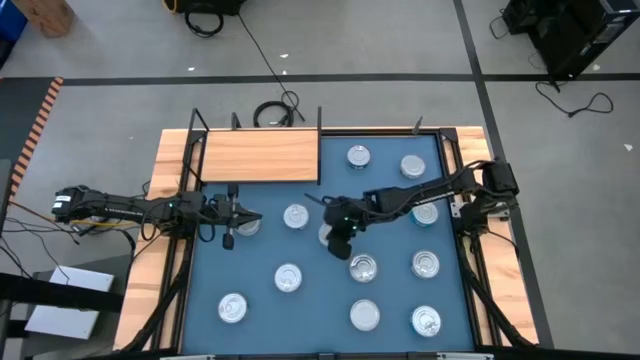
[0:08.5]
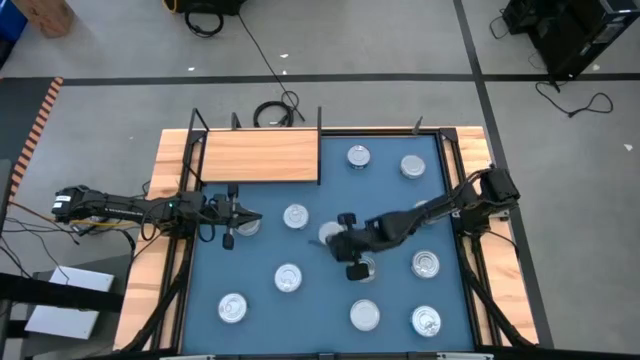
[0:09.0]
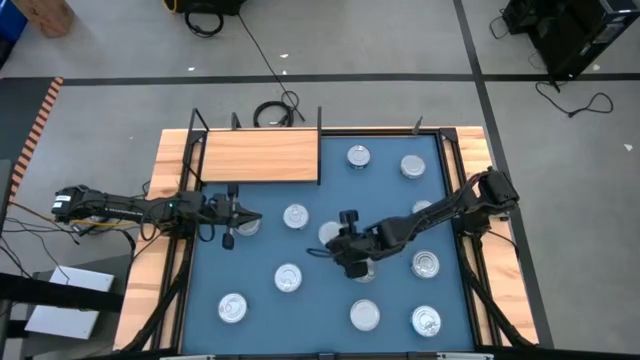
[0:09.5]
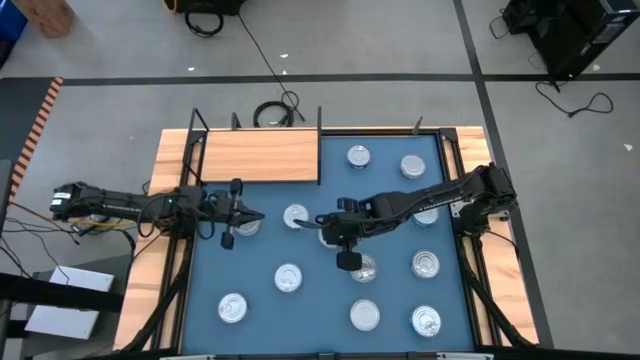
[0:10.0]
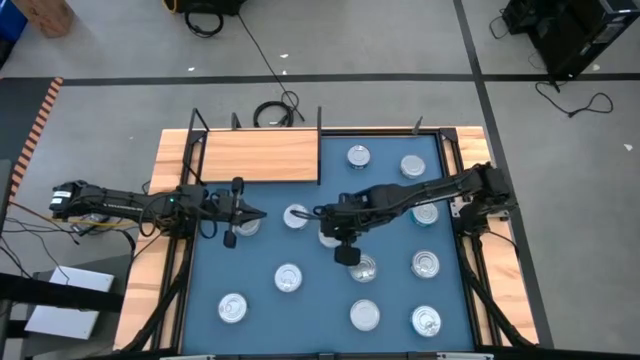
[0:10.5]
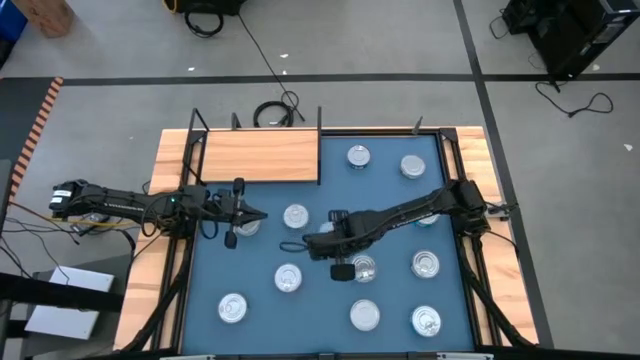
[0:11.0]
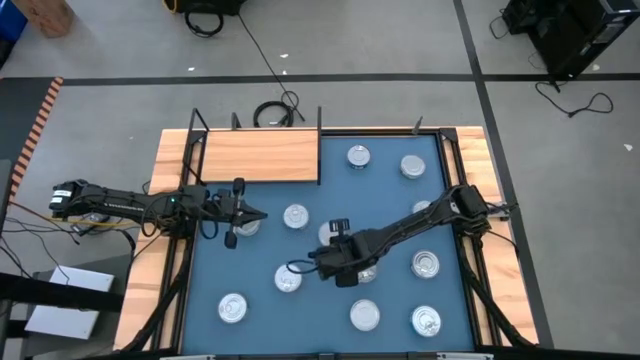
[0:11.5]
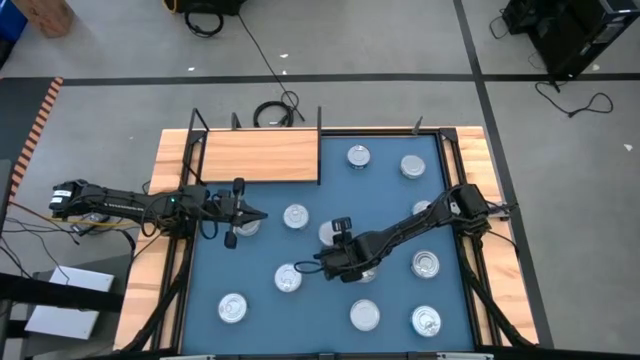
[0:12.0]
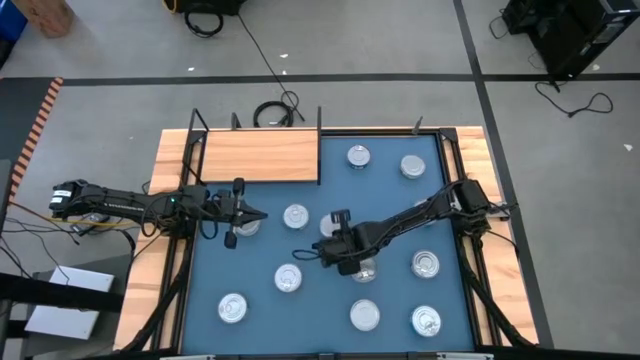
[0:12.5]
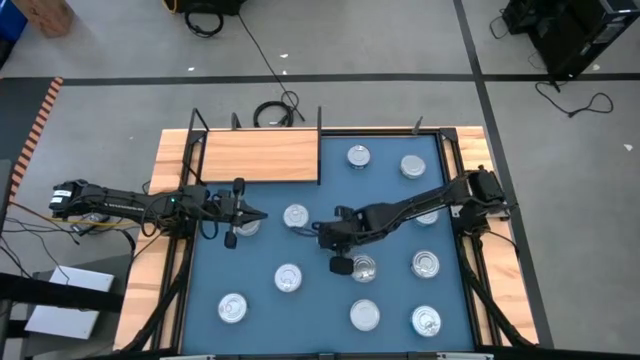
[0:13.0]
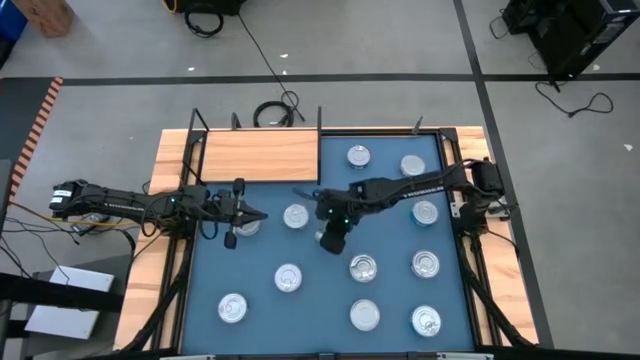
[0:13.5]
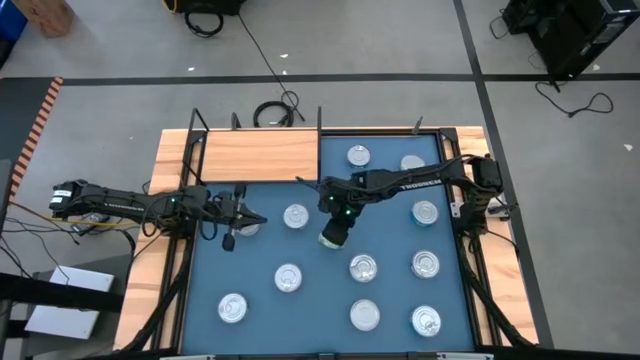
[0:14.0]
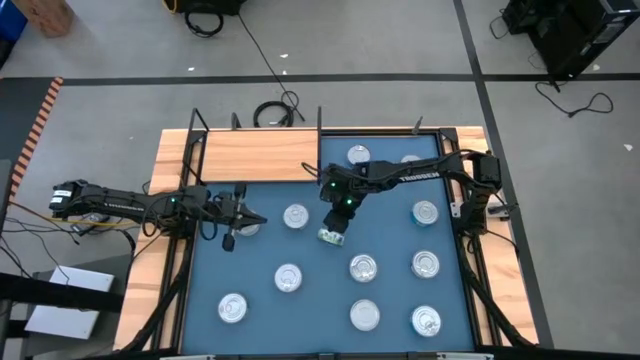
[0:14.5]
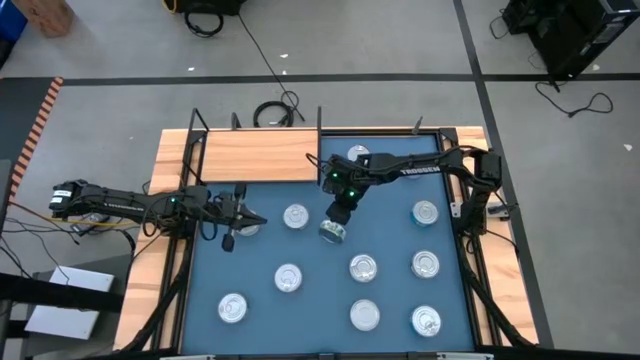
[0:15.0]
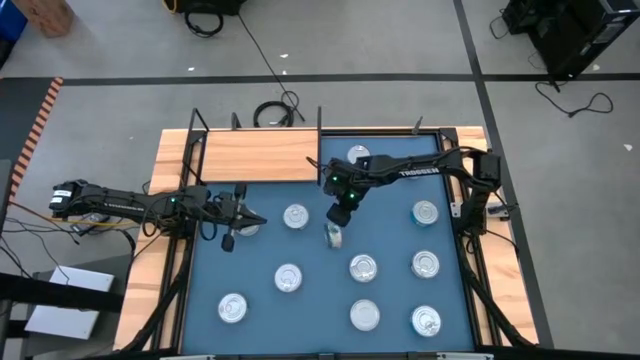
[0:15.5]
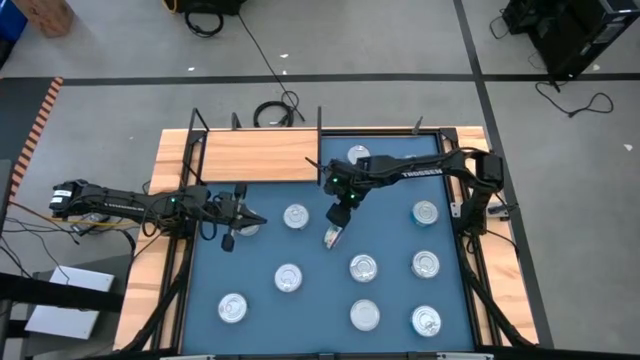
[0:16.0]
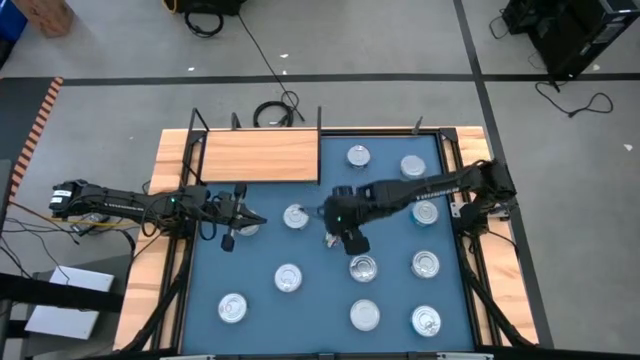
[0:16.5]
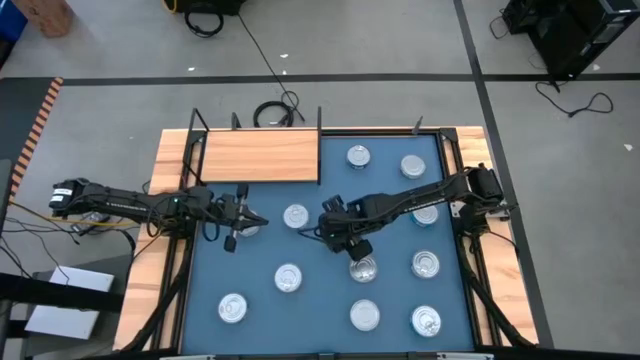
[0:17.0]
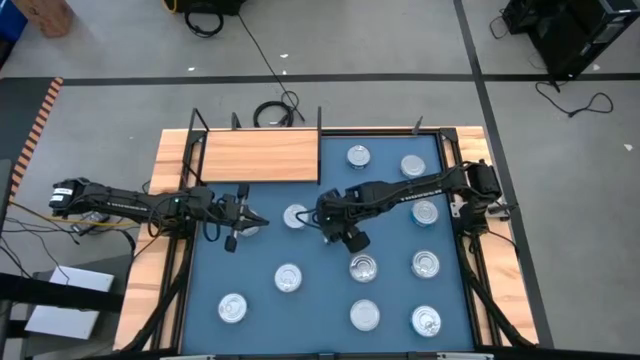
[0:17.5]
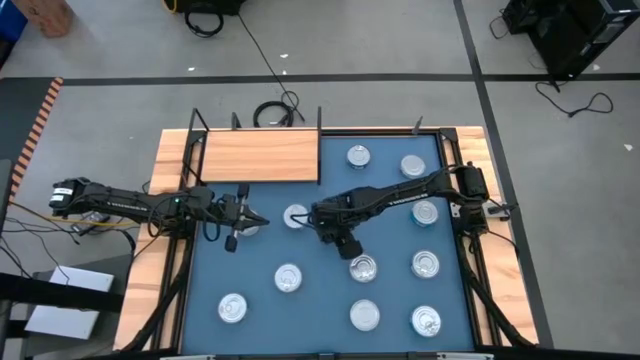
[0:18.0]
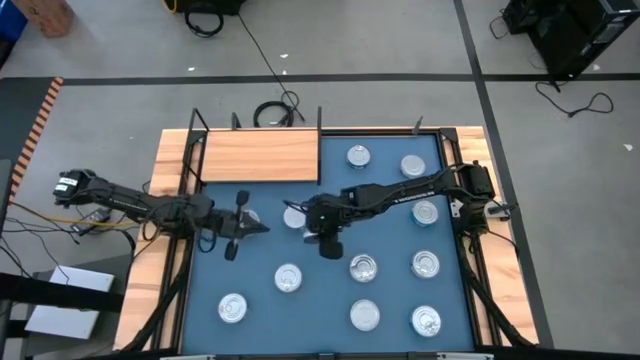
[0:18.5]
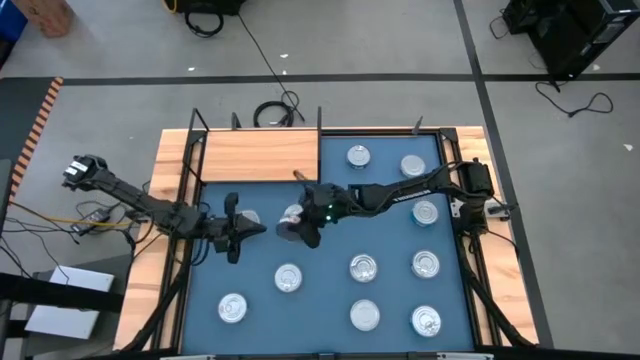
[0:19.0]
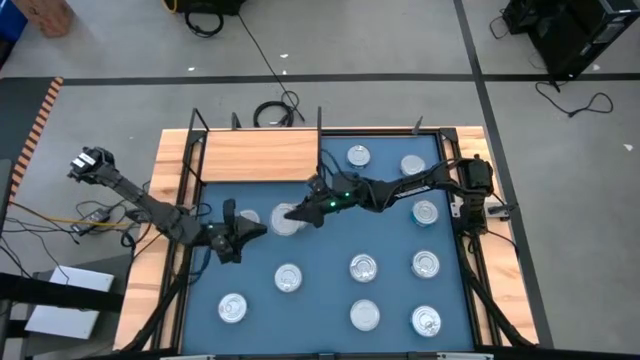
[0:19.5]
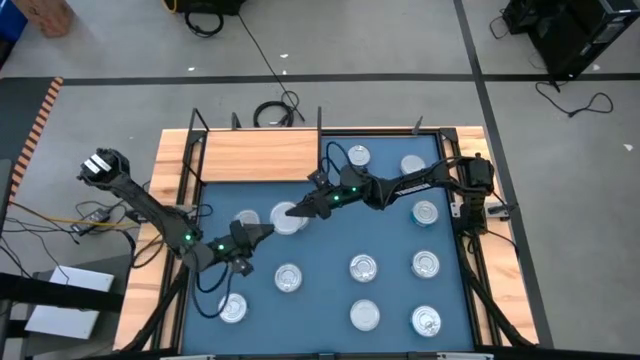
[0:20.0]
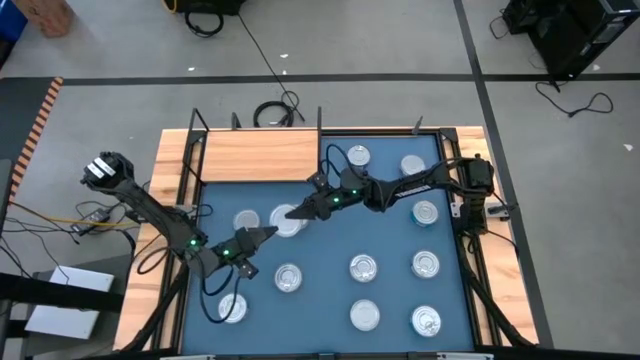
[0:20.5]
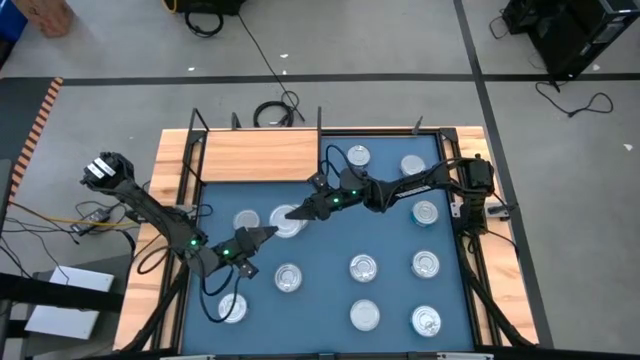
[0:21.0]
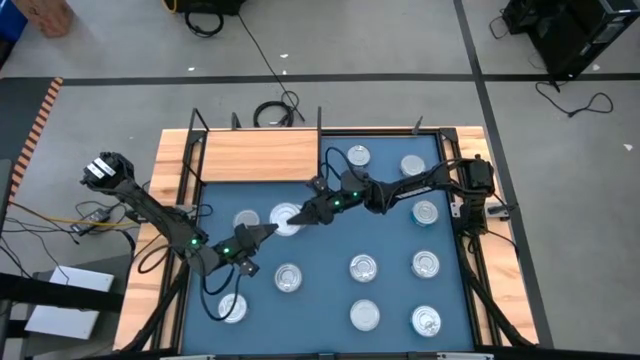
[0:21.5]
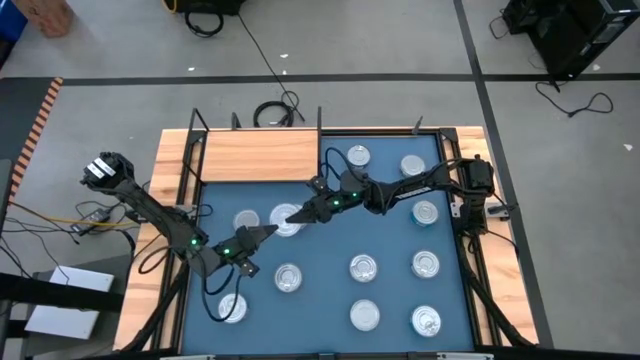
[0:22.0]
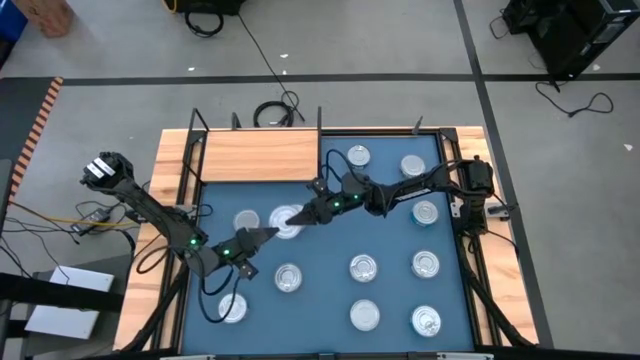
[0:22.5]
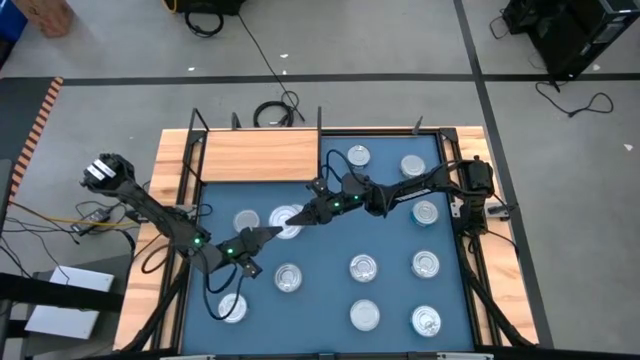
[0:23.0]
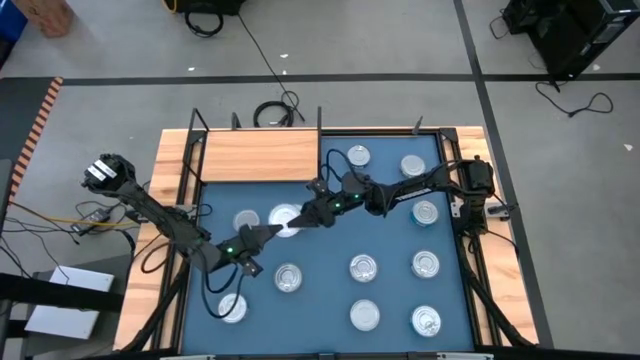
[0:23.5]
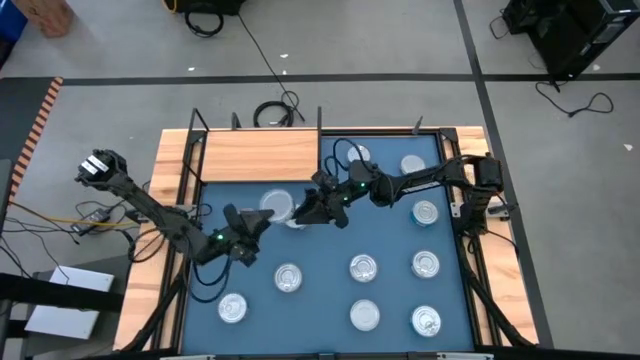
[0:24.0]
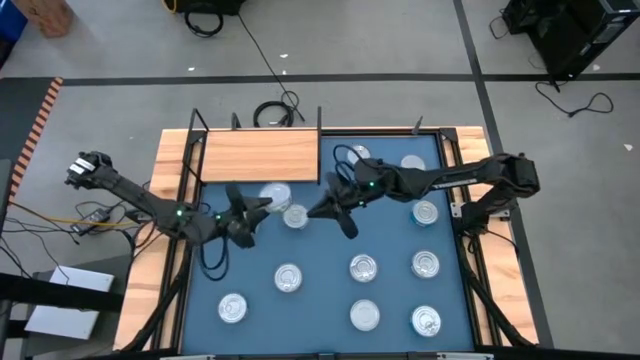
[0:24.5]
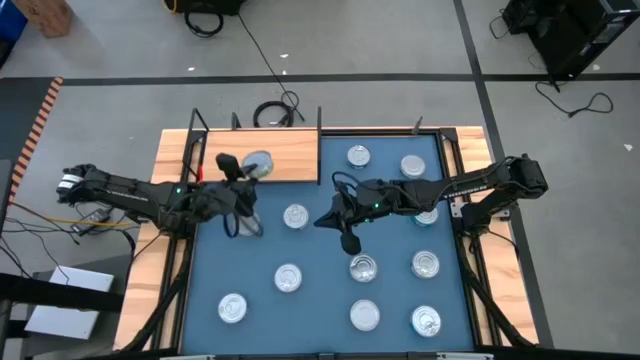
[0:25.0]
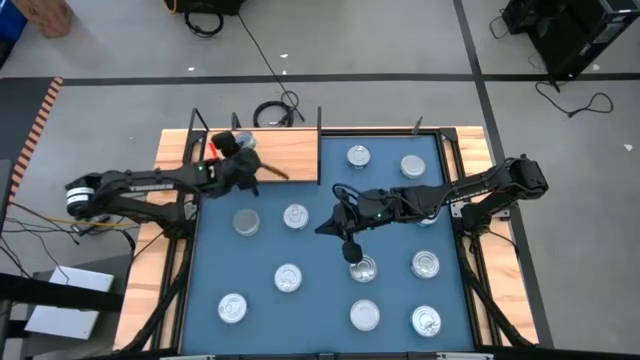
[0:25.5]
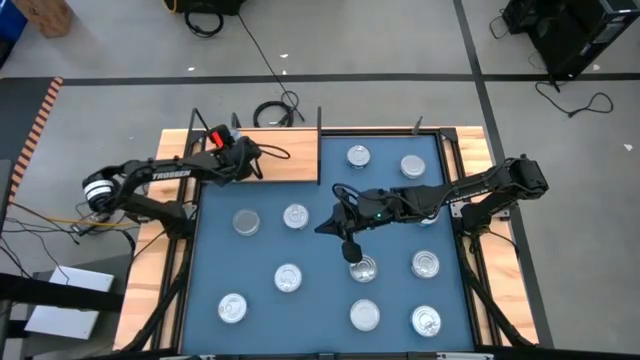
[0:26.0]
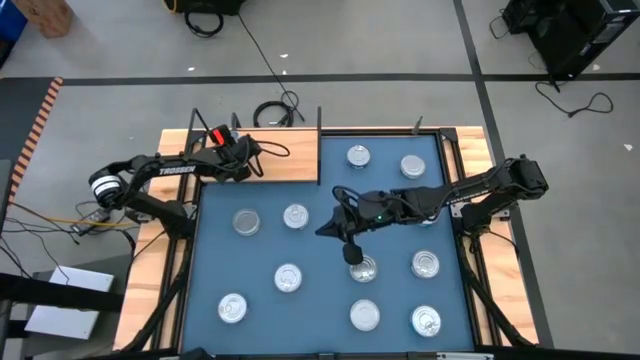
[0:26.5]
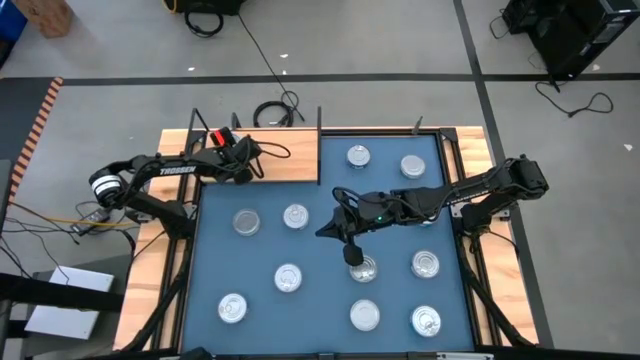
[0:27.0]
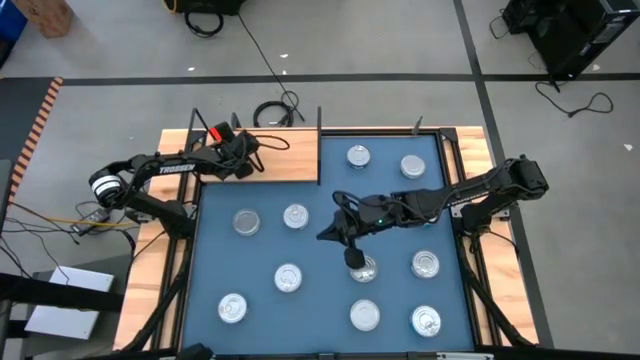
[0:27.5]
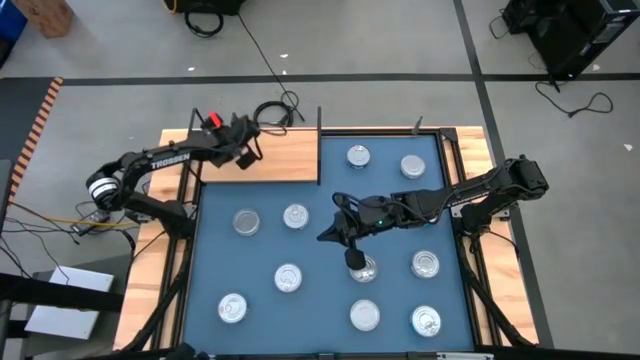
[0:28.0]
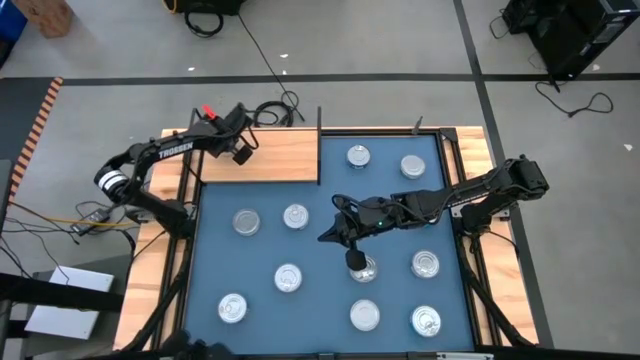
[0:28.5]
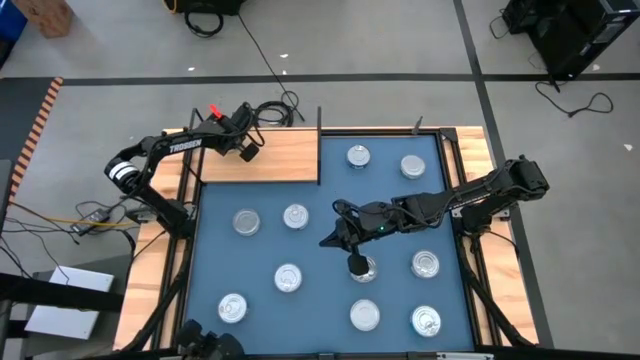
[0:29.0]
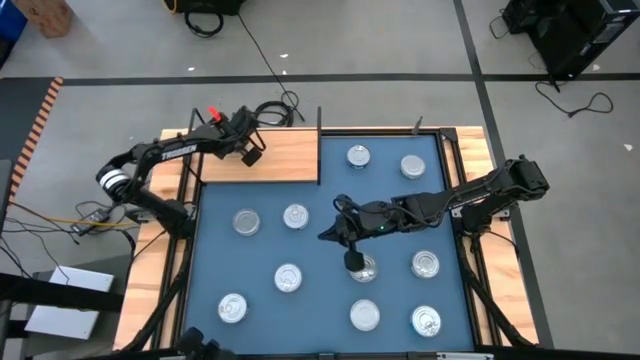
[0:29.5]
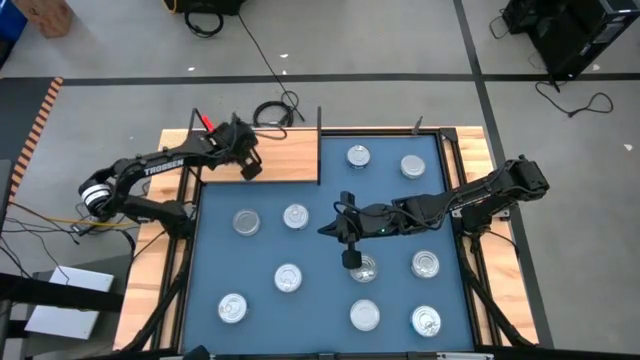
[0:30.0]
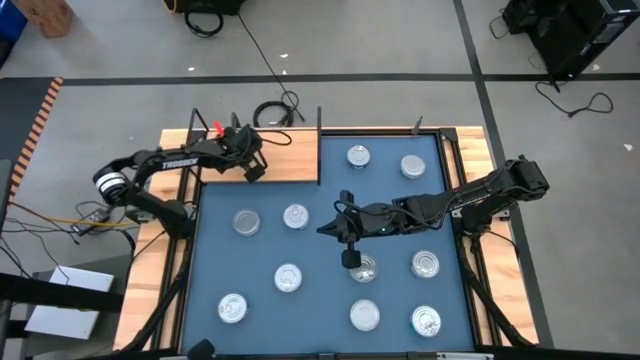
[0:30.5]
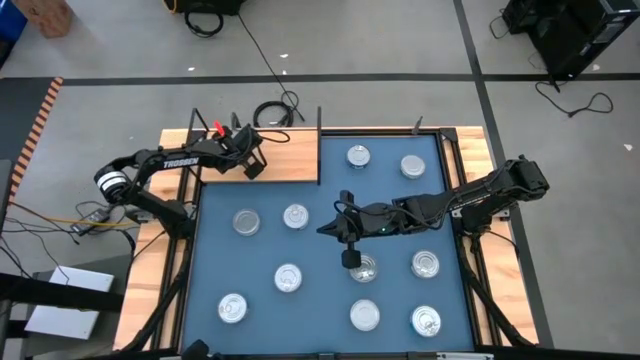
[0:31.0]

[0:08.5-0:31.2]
Task: Stack canned seafood by type on shelf
Put the green tuna can on the shelf
